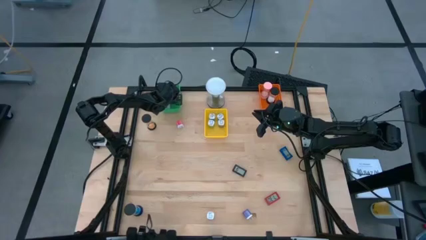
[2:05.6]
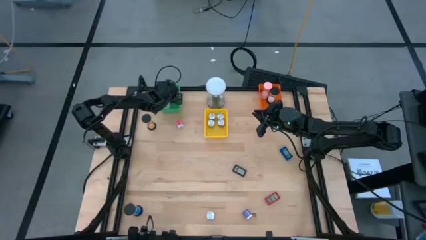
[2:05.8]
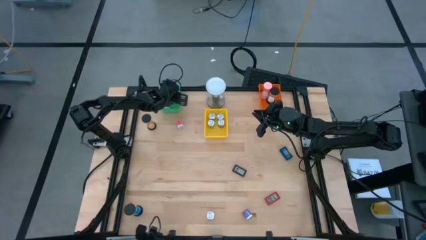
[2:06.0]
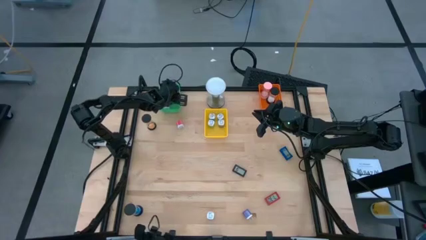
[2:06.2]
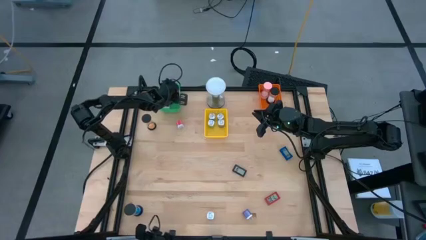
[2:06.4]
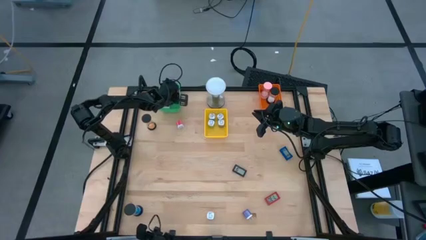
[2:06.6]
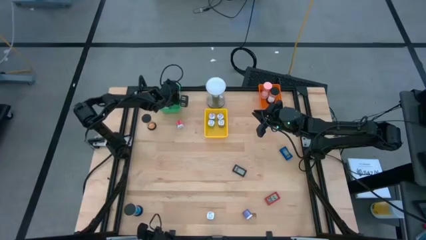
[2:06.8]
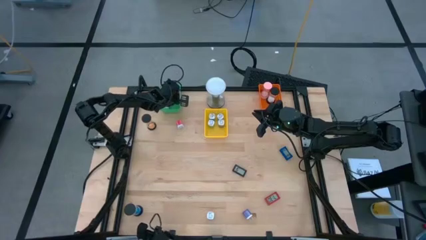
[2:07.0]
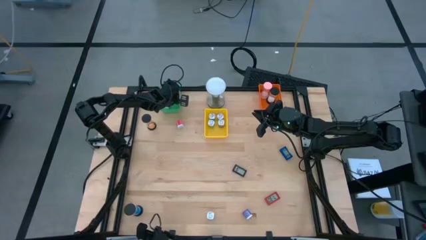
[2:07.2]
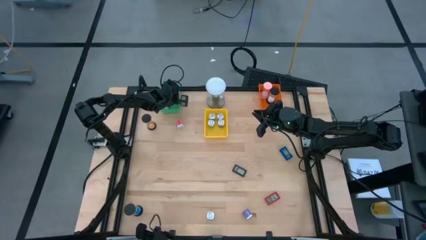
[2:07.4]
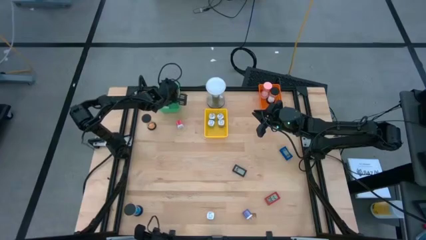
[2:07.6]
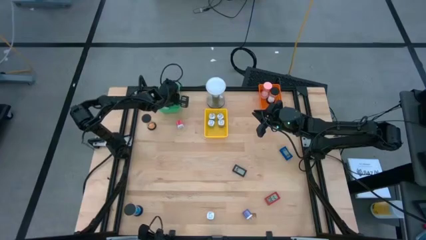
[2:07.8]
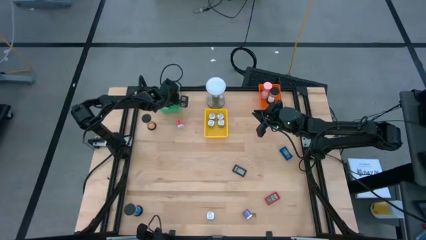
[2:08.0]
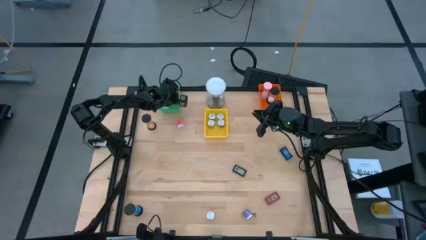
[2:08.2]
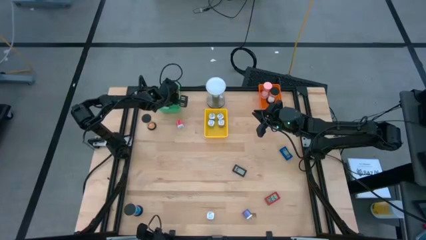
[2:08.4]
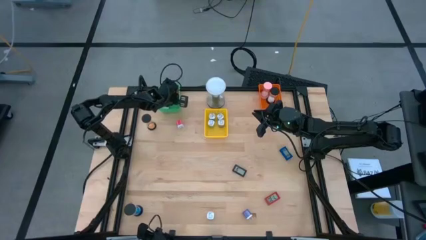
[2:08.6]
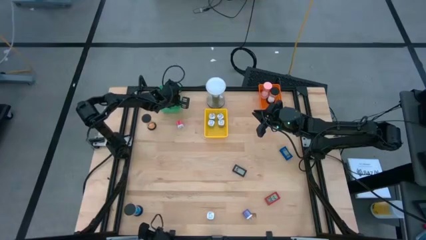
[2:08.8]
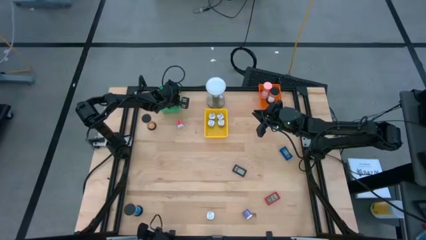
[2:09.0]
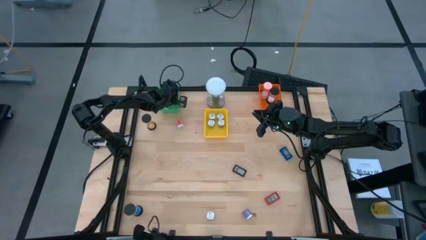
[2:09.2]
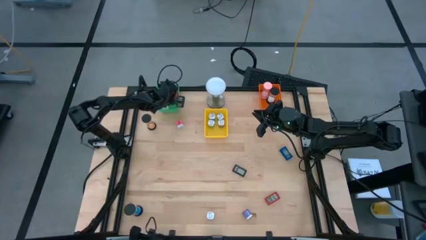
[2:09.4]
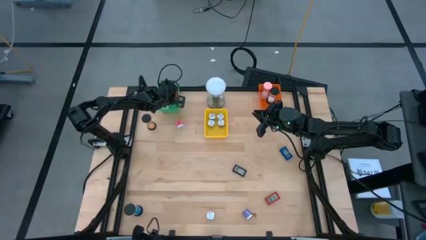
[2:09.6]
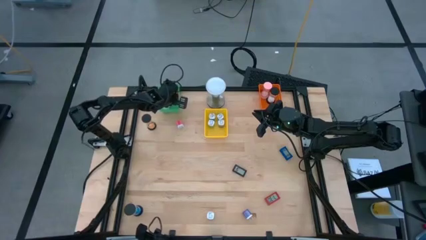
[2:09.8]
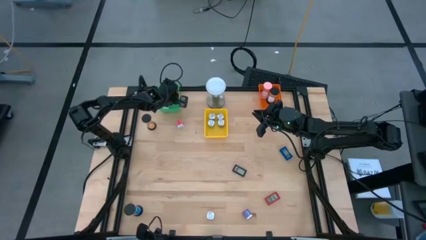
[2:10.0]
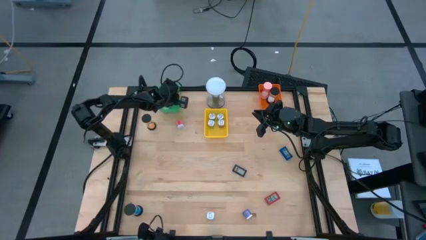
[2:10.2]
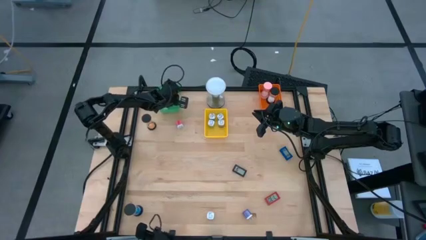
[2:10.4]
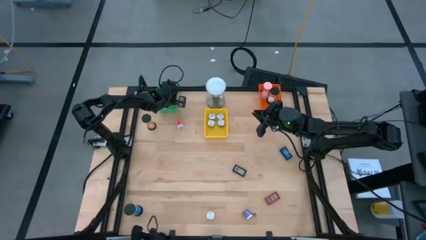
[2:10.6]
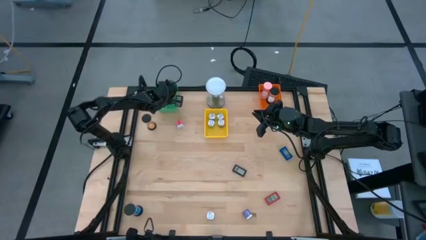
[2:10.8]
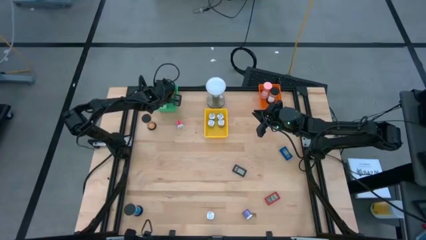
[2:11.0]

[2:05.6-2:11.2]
Task: Pick & Place Office items
Adjust the red digital clock in the green bin

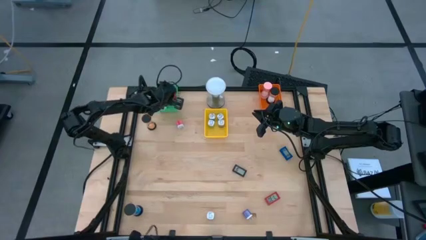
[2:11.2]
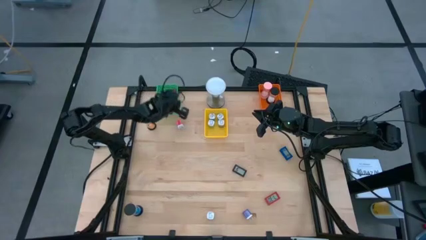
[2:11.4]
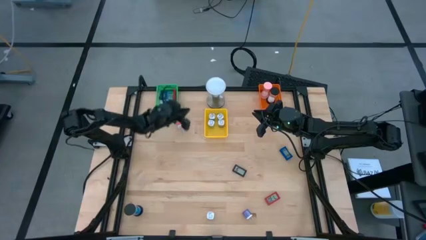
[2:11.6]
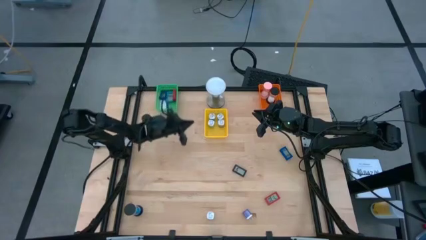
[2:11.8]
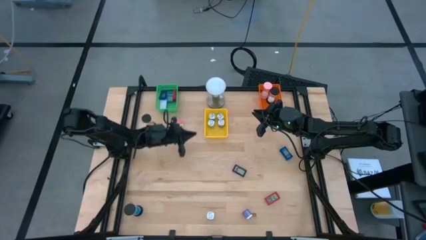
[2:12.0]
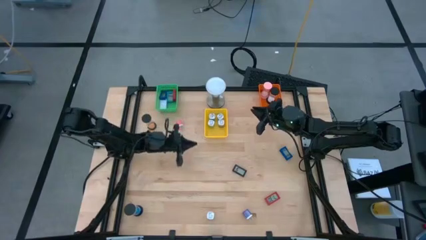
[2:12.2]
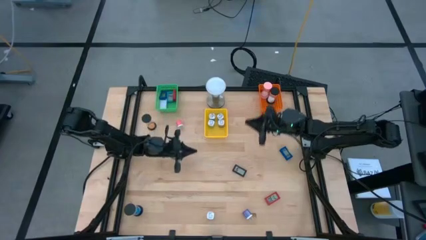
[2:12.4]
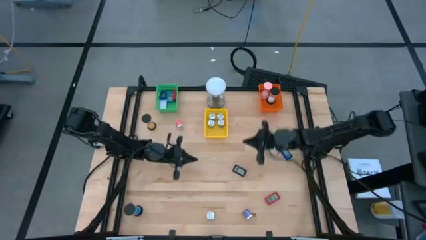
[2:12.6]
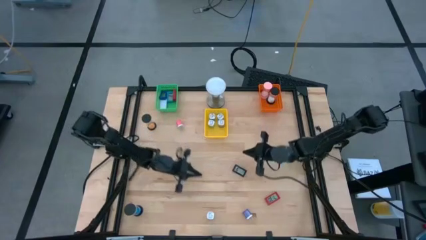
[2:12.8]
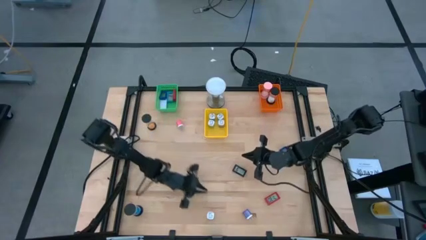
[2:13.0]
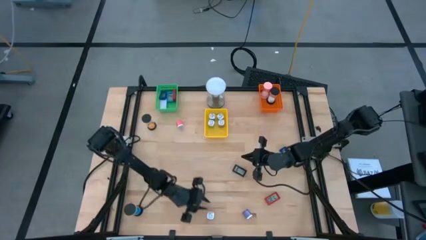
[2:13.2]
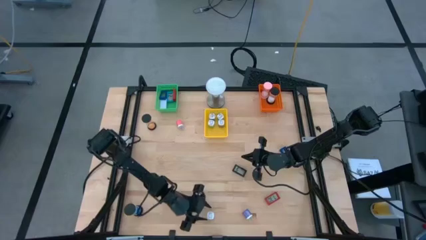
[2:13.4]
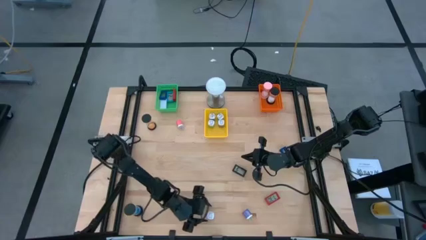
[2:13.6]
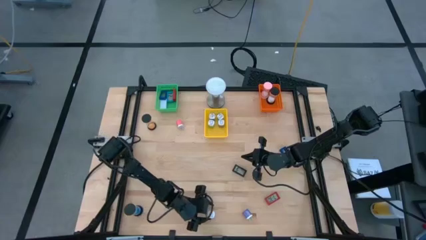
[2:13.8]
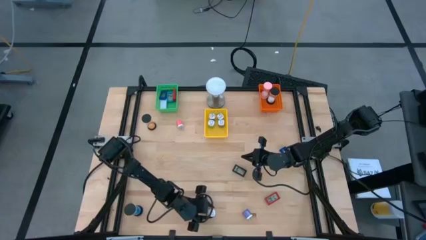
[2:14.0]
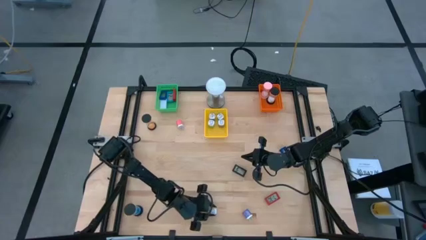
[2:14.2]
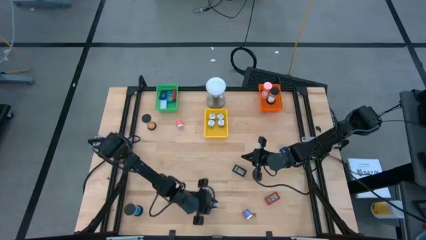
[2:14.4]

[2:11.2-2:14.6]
Put the left purple charger adapter into the yellow bin

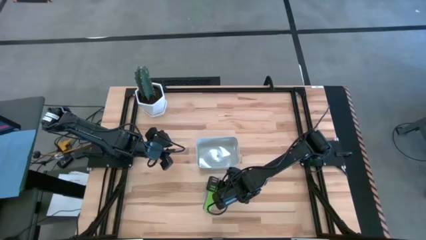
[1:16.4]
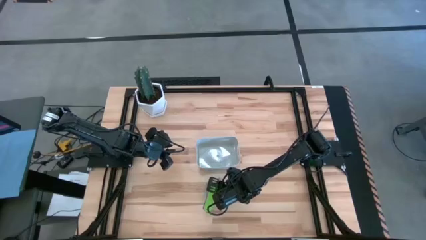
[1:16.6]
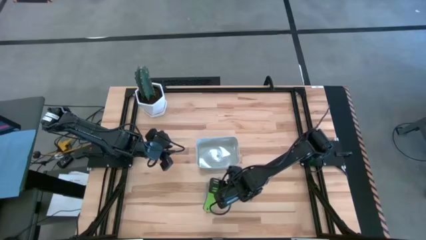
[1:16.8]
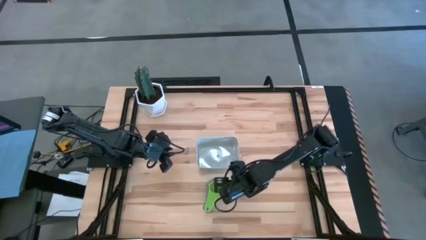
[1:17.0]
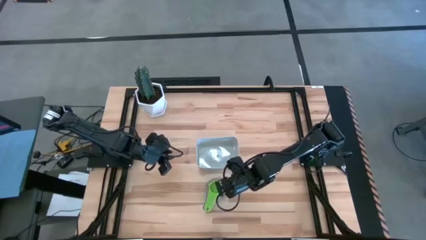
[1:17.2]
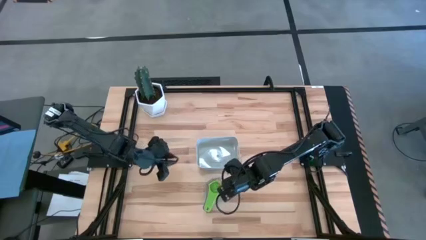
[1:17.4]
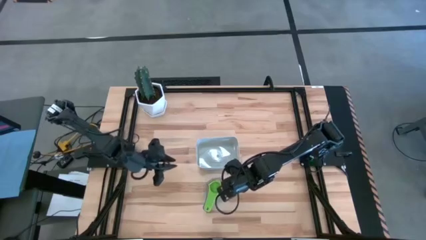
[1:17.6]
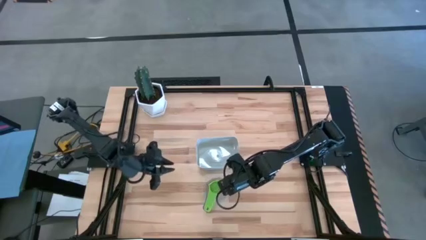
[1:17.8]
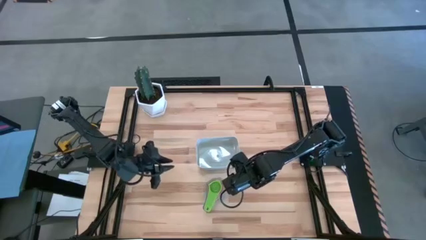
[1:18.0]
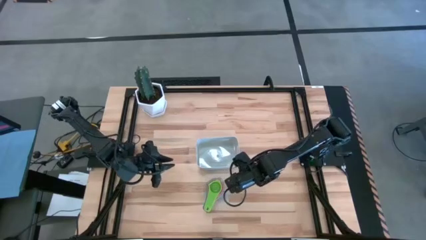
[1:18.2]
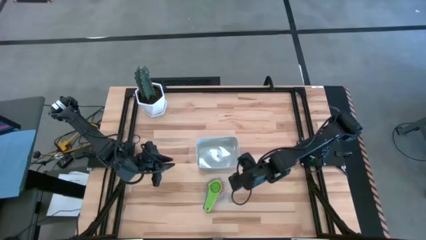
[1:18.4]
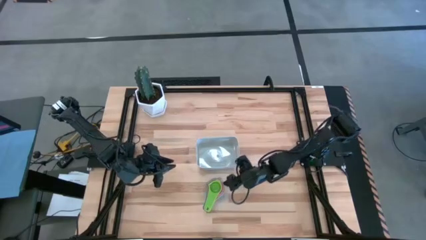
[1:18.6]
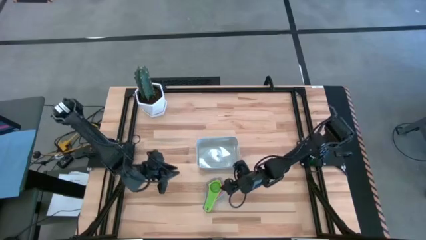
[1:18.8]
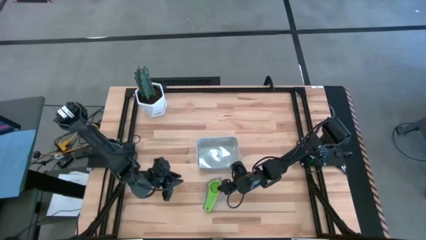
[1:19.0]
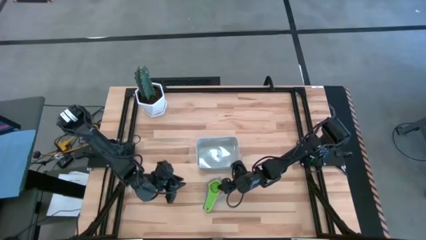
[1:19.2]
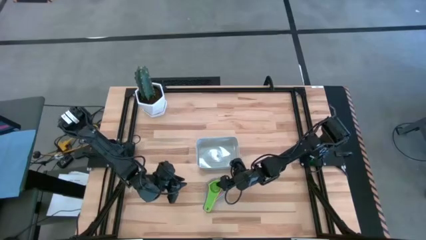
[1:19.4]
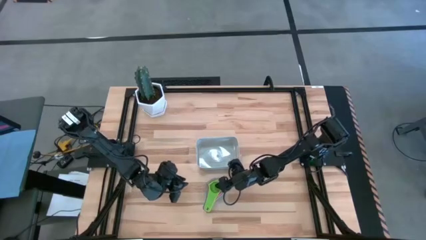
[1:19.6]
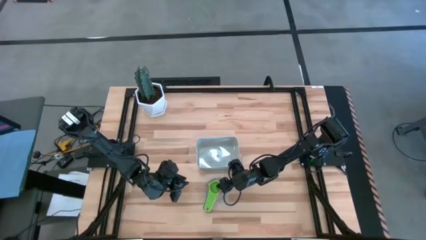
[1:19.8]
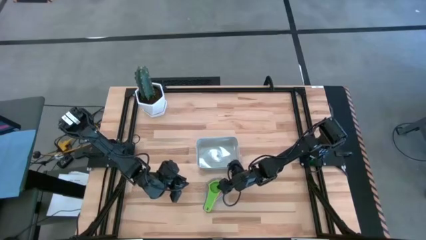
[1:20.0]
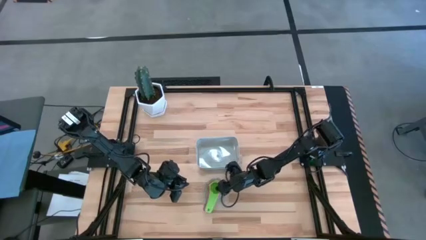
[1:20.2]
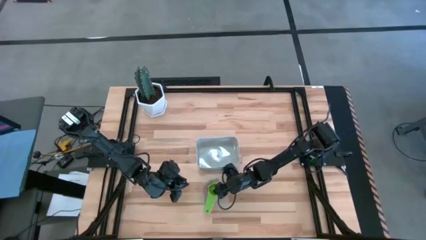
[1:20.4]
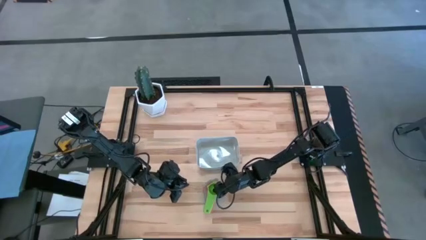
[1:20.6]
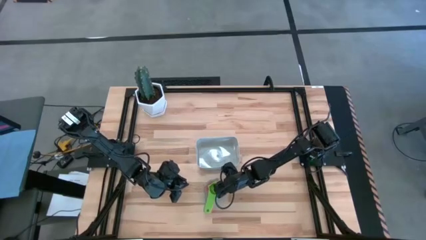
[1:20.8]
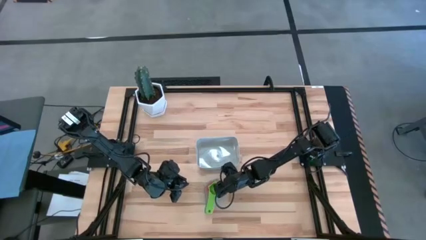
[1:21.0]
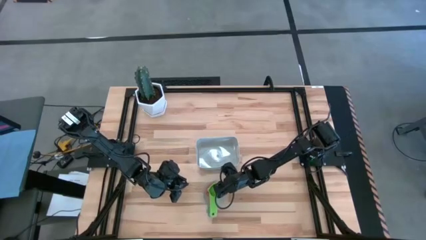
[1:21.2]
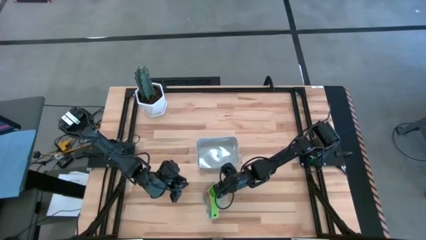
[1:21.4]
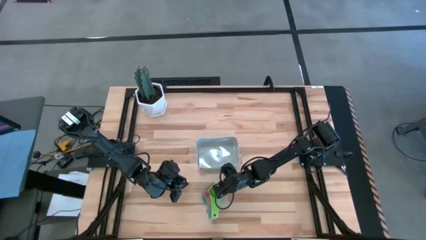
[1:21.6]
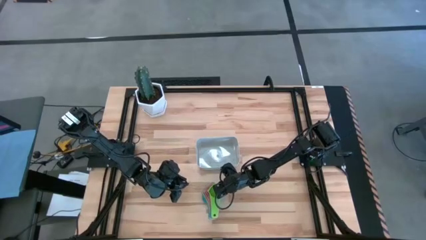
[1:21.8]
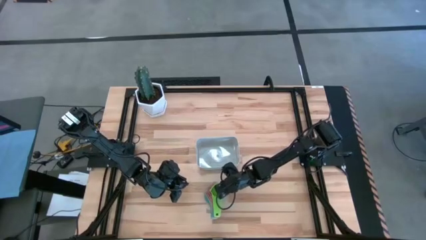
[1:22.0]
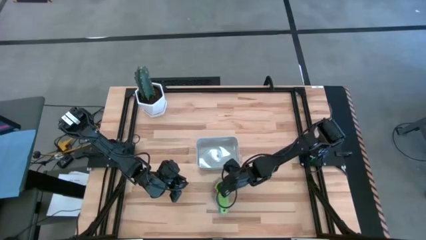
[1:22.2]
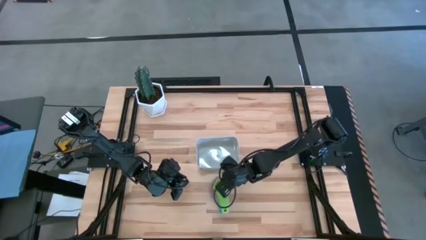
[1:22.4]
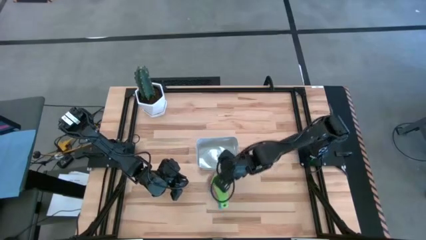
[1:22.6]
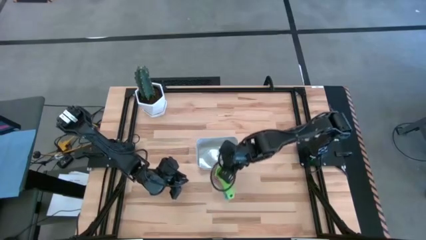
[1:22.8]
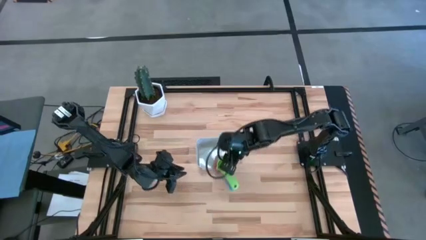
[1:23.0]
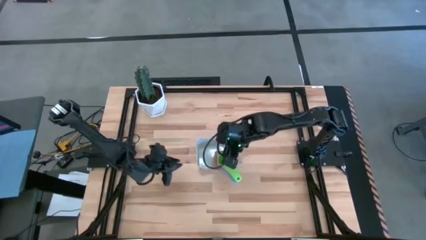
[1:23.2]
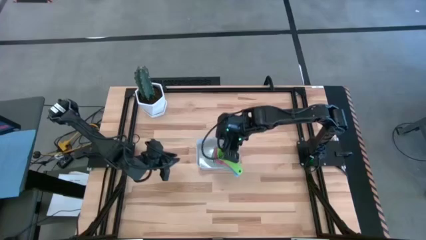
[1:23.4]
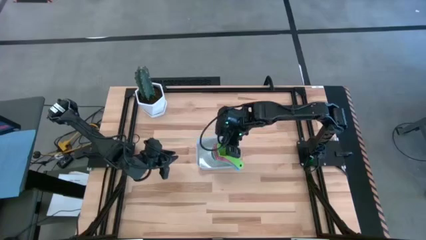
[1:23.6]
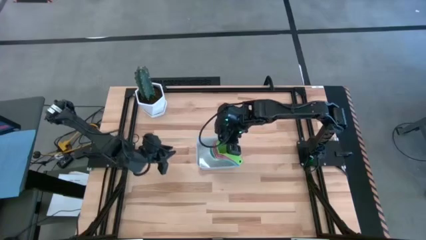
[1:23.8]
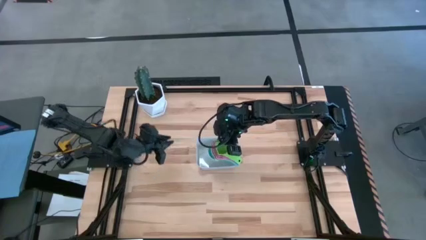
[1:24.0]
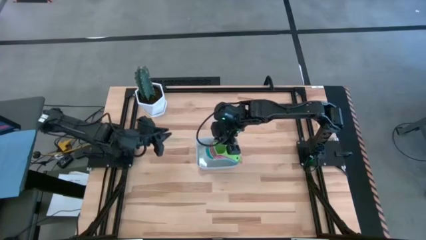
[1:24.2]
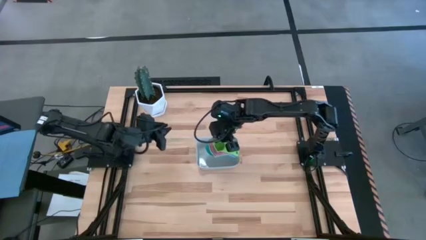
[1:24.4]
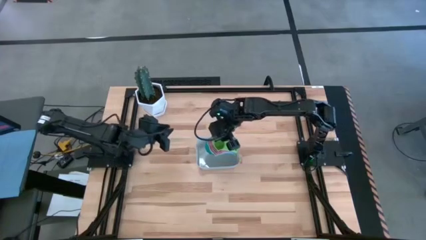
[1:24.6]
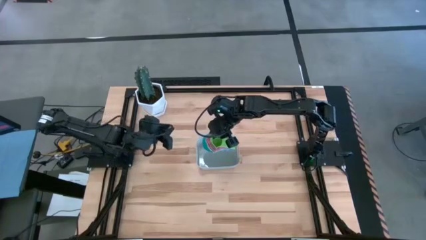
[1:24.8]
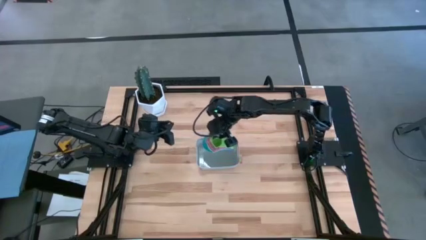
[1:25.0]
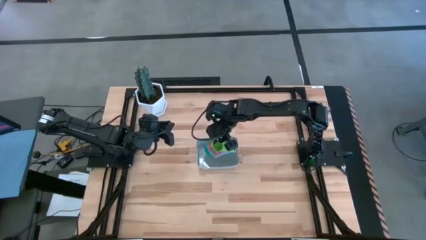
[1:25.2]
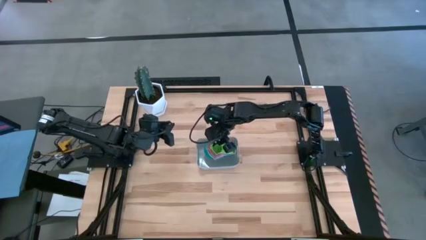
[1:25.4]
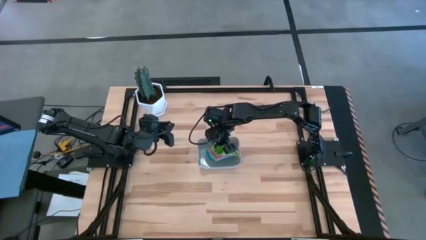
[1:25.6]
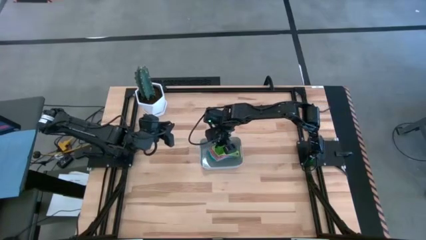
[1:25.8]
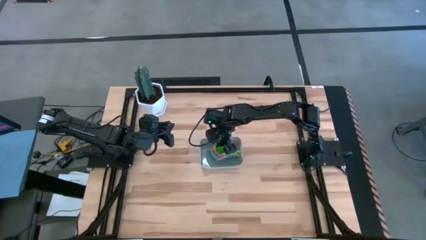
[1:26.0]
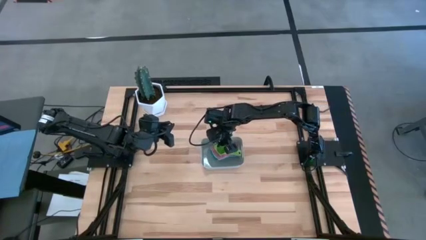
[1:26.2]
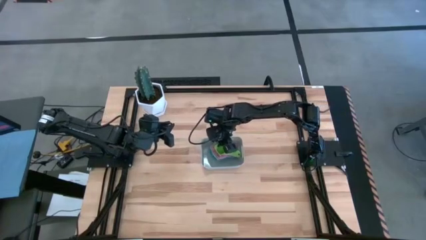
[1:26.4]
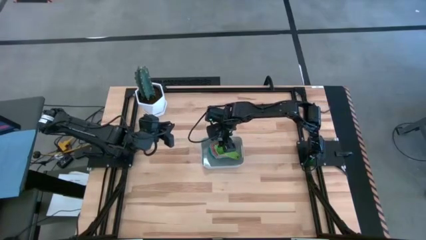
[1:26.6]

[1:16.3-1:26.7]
Task: Nest measuring cups in basket
Put the stacked measuring cups into the gray bin
